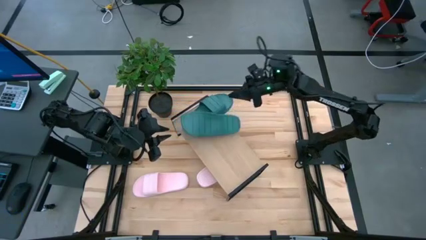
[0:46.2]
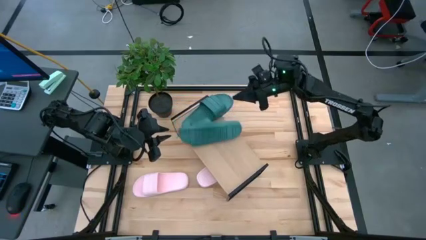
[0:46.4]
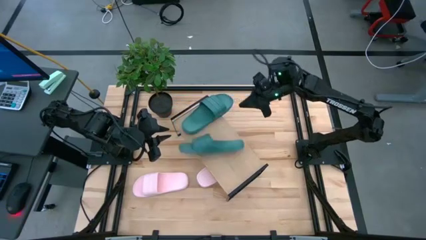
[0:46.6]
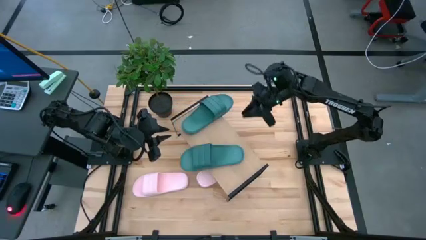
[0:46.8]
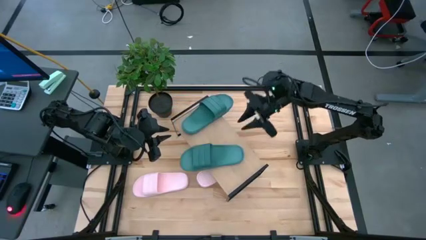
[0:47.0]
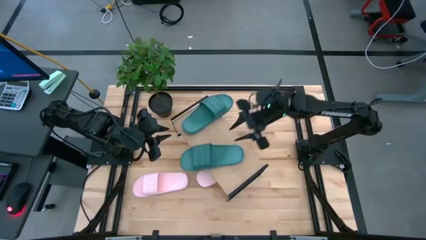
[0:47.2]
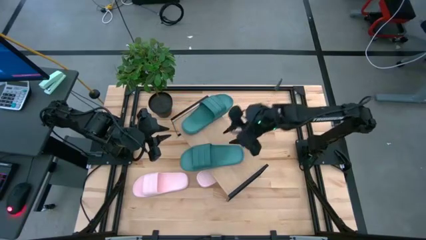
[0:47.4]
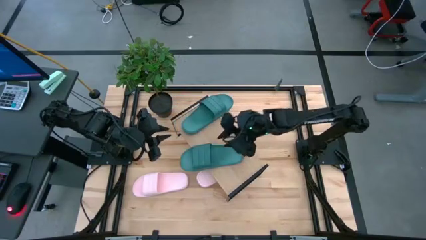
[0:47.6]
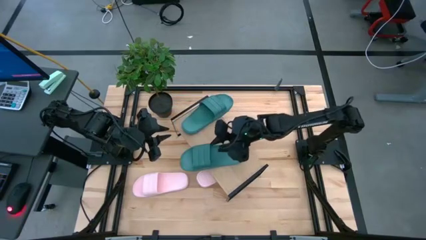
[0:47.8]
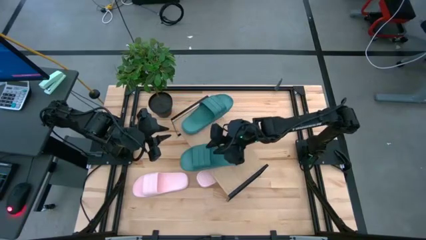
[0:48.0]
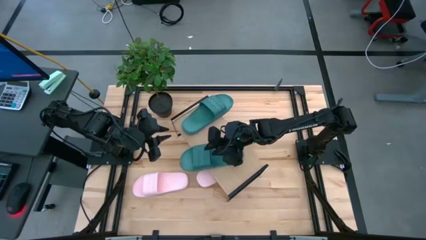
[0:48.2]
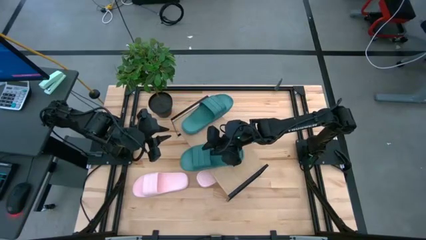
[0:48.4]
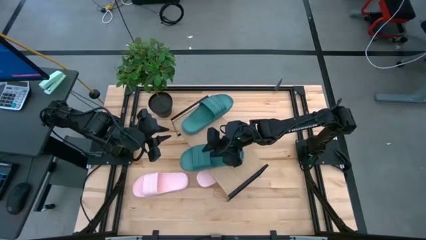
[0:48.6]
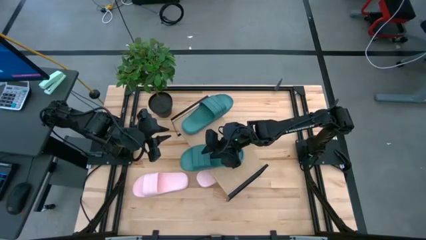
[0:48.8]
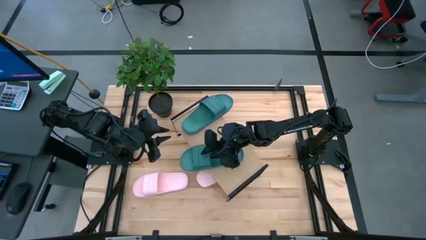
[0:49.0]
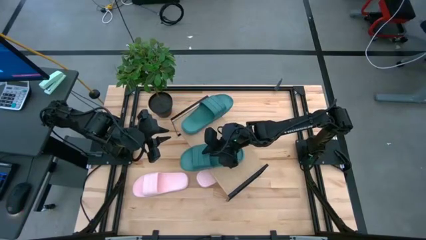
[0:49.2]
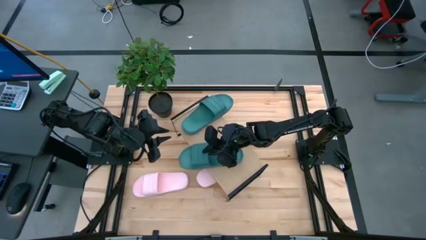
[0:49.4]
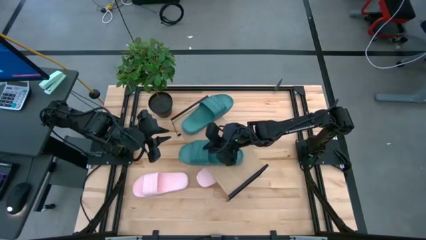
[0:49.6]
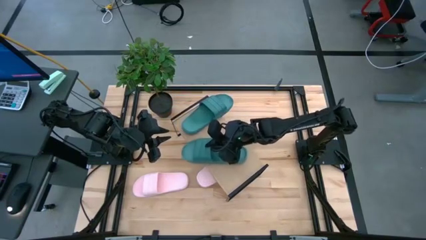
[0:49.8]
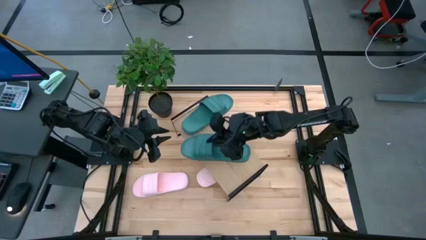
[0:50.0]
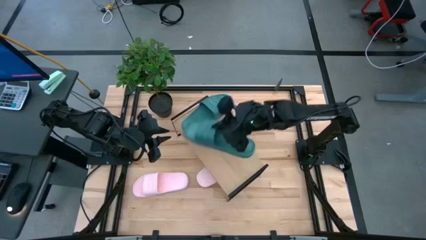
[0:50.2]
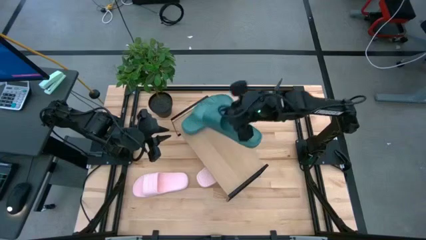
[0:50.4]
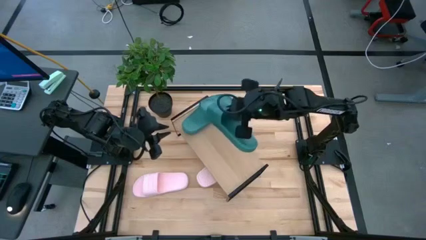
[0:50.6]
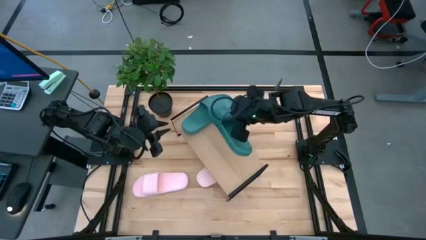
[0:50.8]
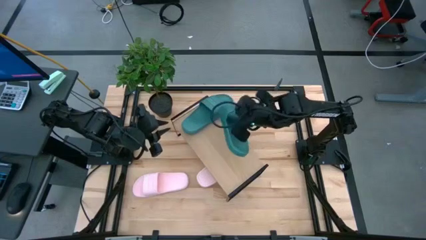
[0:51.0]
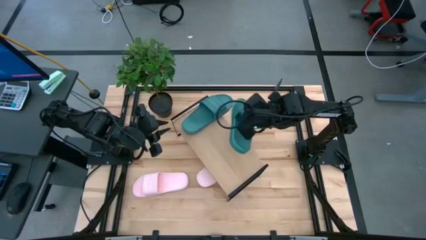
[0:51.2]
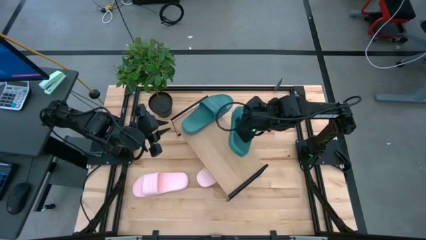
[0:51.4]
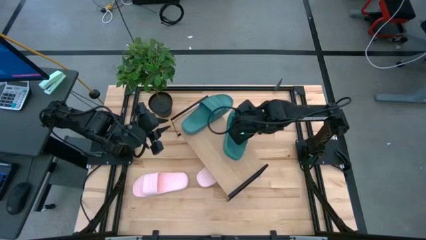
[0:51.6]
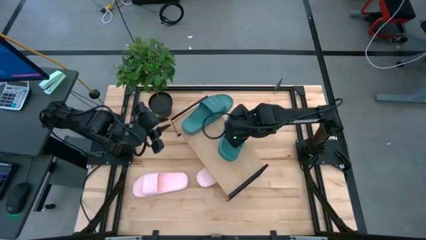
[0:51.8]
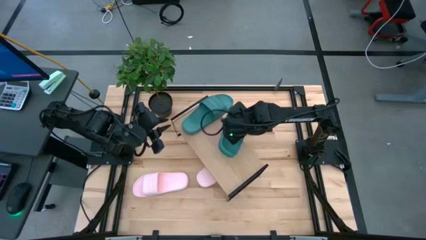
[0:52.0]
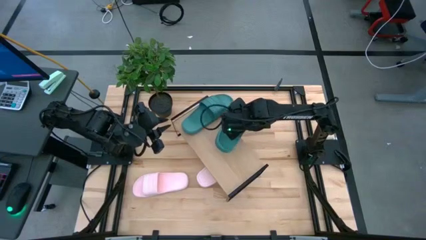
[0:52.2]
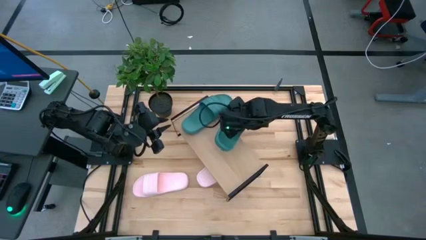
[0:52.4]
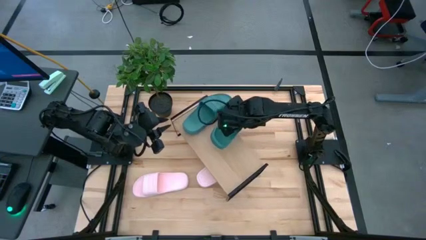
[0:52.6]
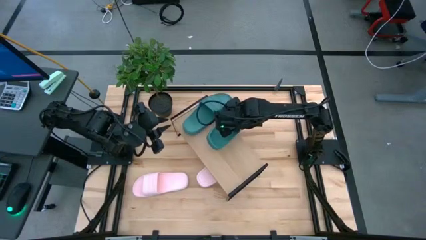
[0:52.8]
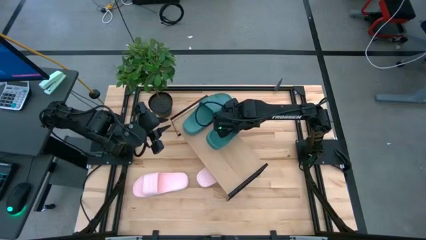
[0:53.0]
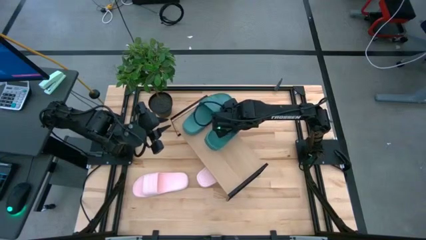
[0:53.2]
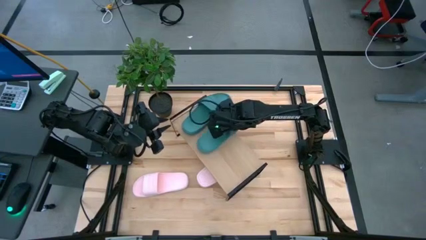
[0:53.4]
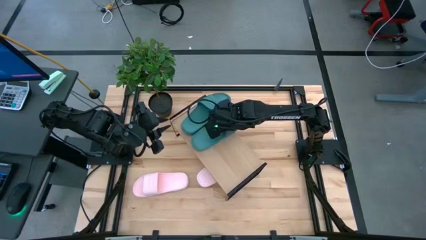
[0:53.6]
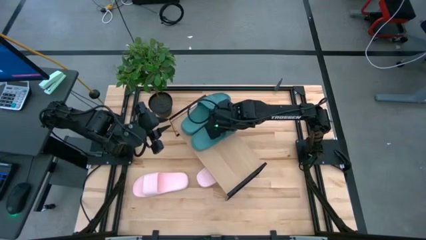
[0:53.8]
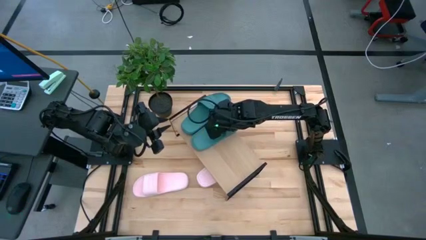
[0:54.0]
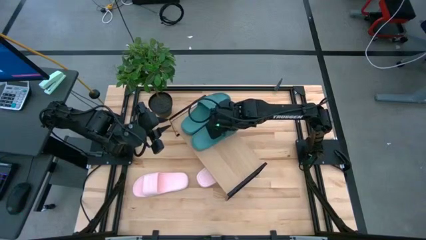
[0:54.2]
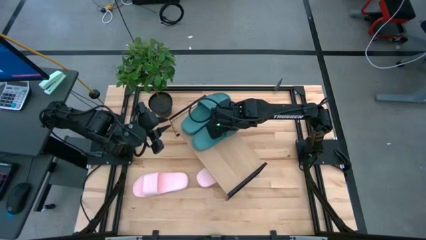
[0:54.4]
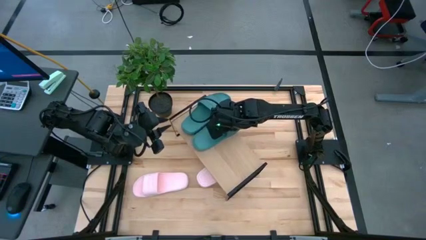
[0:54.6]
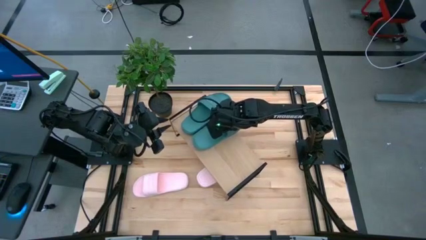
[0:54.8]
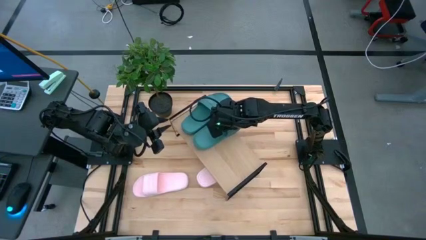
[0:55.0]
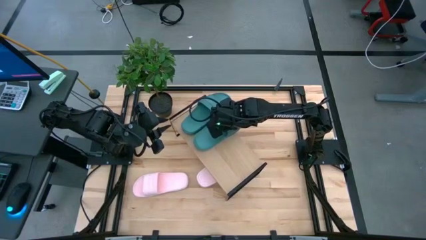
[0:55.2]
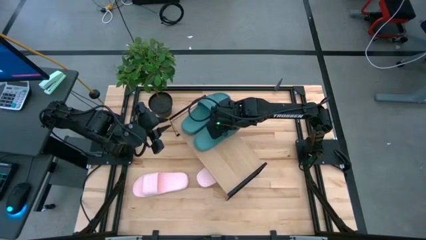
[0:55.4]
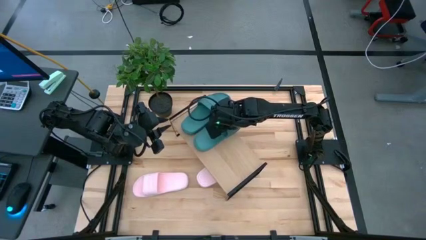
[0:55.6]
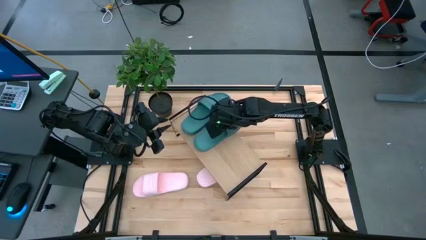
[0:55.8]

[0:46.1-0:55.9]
Task: Pick and place slides into the shelf
Put the green slide on the shelf

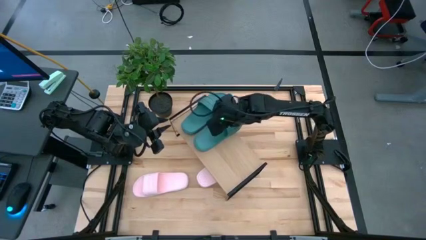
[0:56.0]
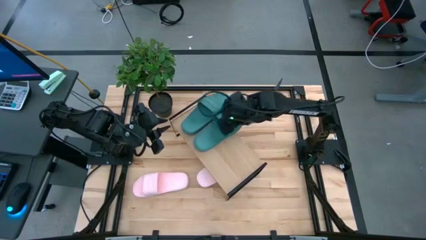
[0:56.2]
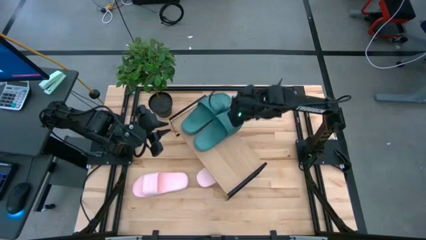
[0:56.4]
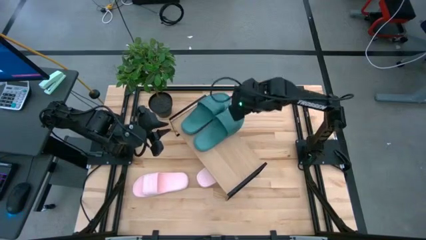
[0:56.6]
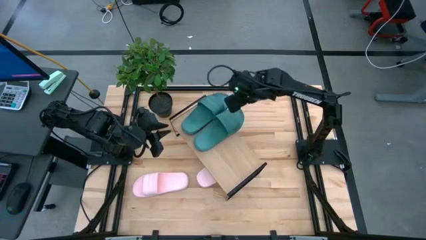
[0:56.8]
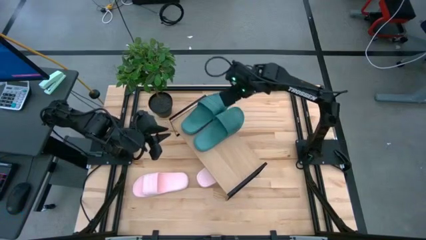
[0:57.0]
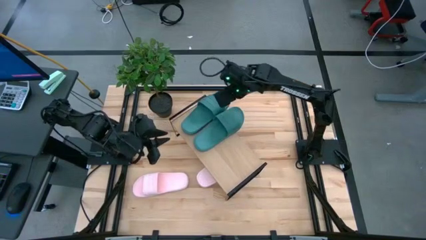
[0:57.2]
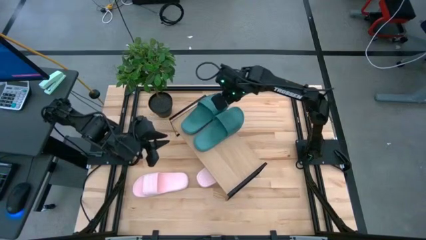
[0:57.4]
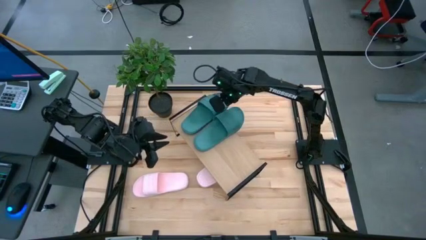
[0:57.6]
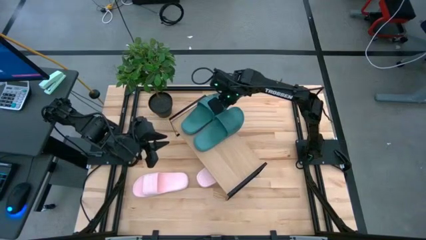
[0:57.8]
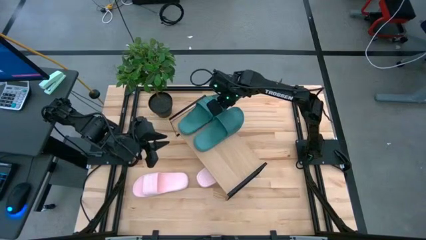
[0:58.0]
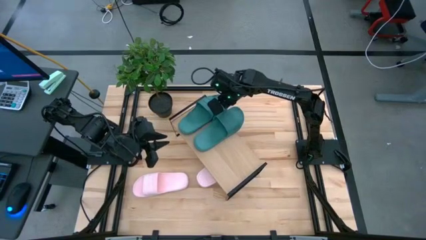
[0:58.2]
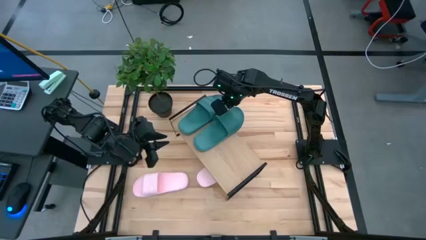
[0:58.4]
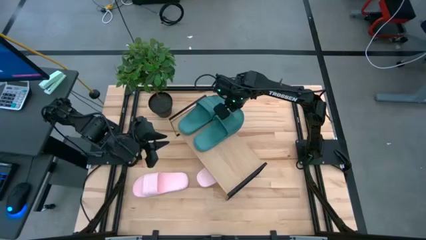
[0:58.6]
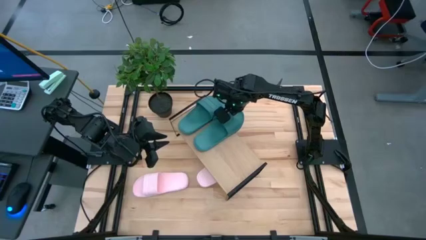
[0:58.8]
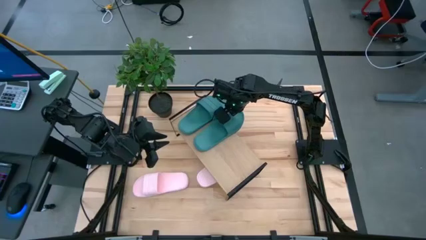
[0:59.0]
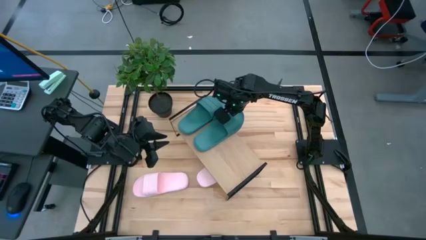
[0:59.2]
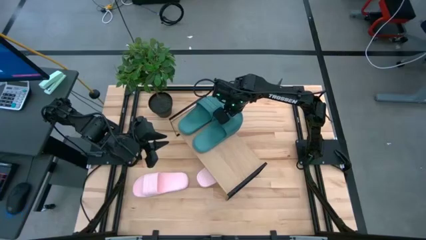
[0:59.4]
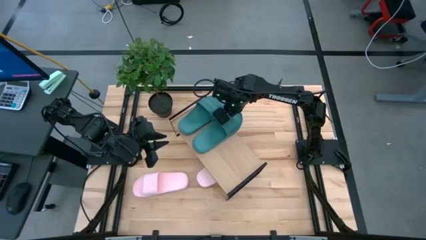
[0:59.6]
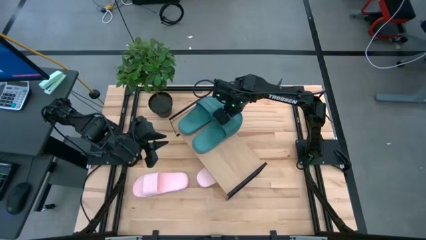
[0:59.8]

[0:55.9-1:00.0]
Adjust the green slides on the shelf

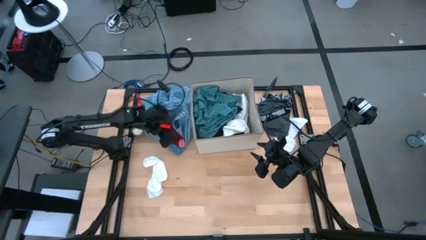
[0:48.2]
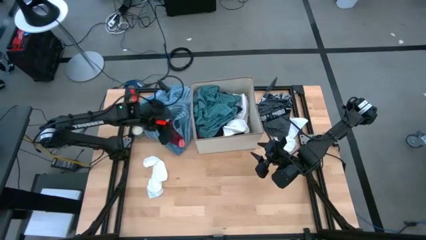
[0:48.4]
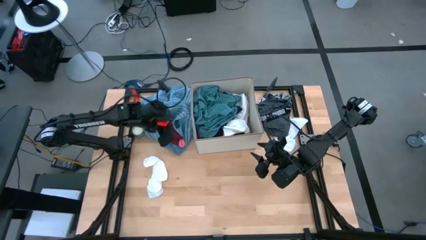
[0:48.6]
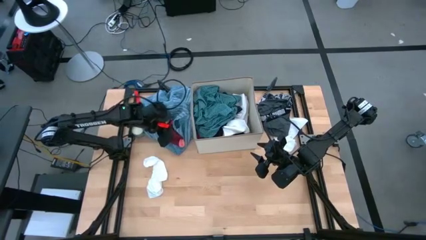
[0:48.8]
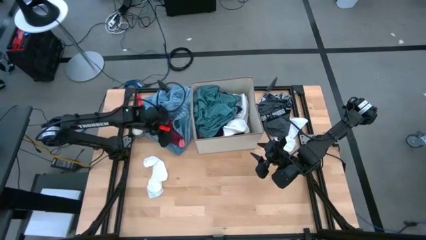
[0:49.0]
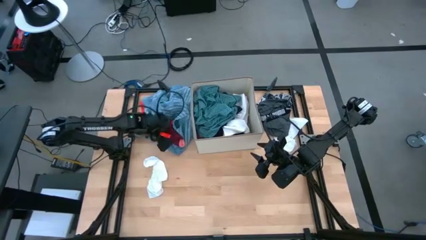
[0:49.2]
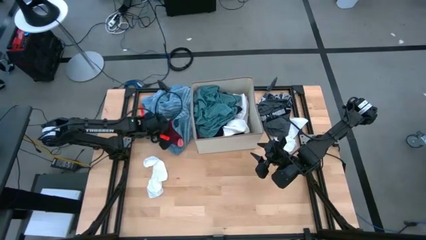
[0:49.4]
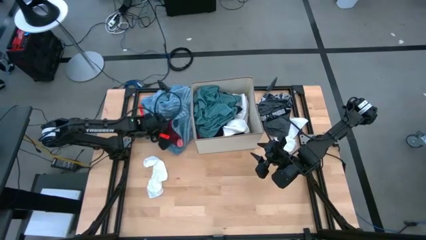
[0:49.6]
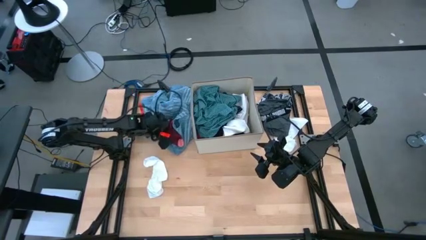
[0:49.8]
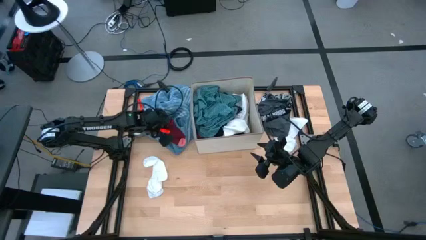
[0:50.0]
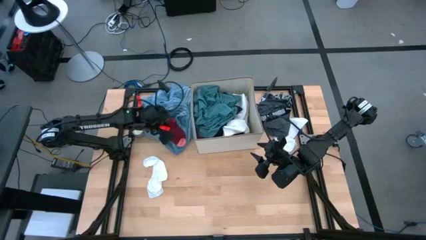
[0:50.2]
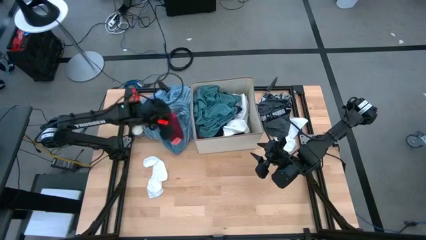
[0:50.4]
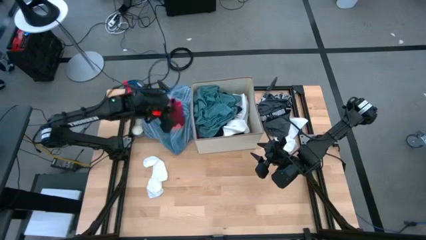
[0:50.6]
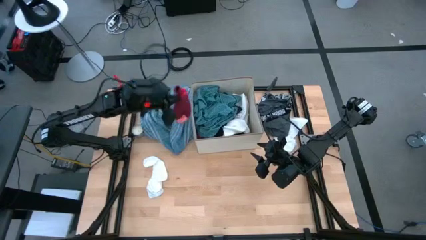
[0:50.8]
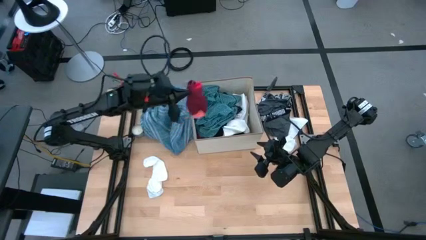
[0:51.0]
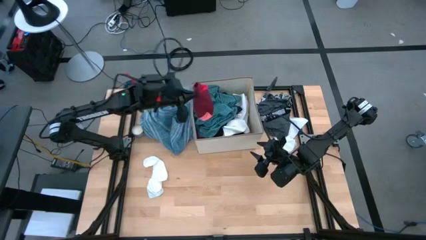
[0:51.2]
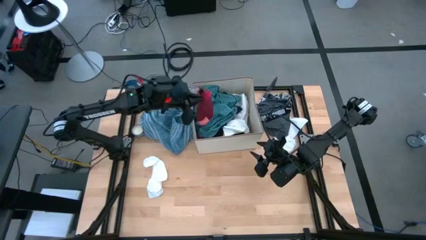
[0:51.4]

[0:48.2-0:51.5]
Task: Sort clothes
Put the red sock into the bin
